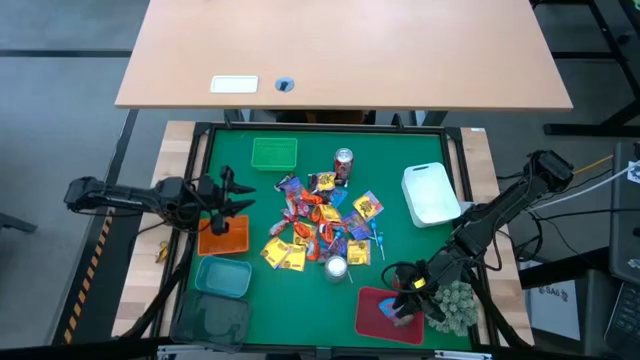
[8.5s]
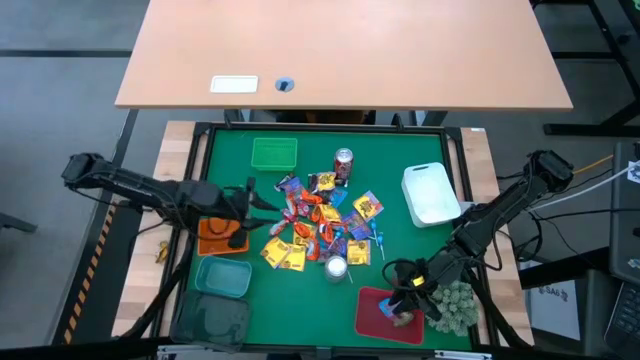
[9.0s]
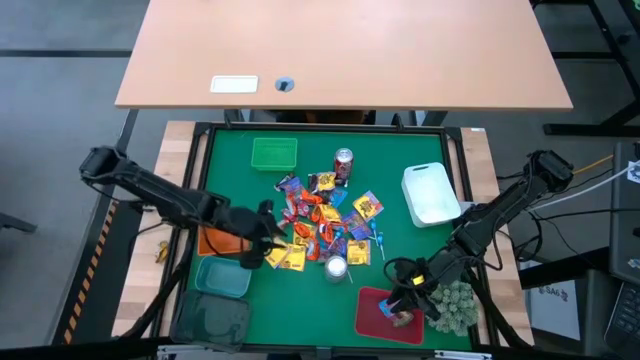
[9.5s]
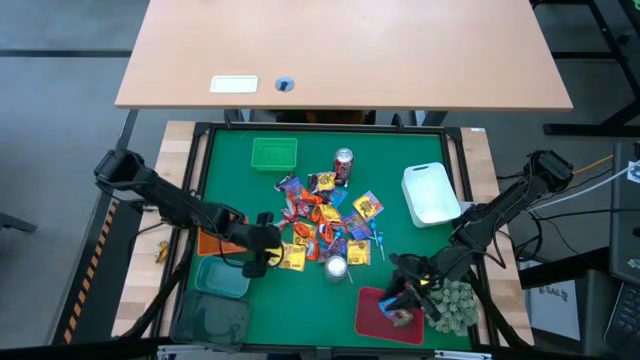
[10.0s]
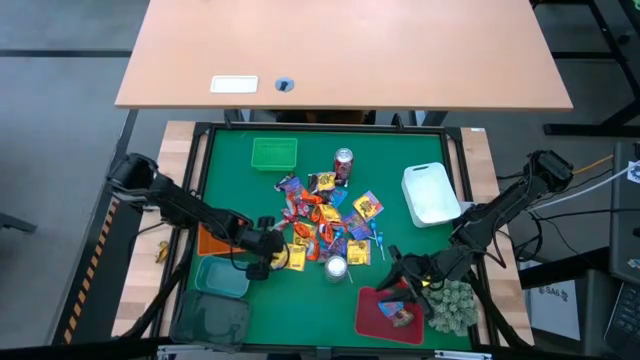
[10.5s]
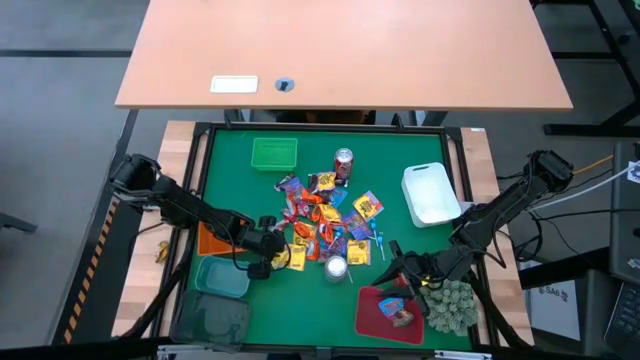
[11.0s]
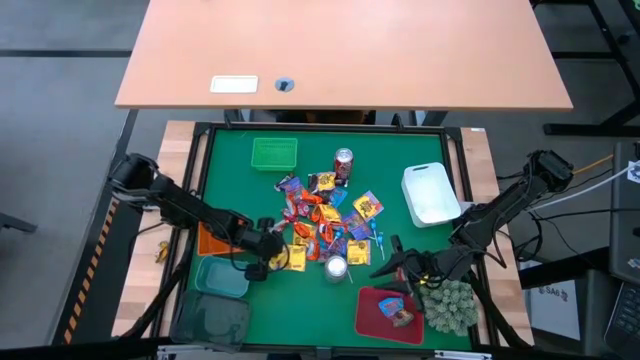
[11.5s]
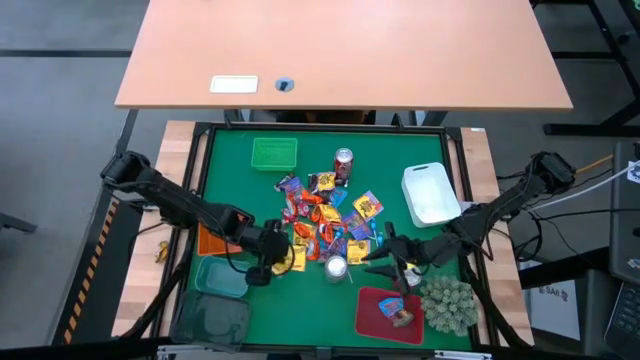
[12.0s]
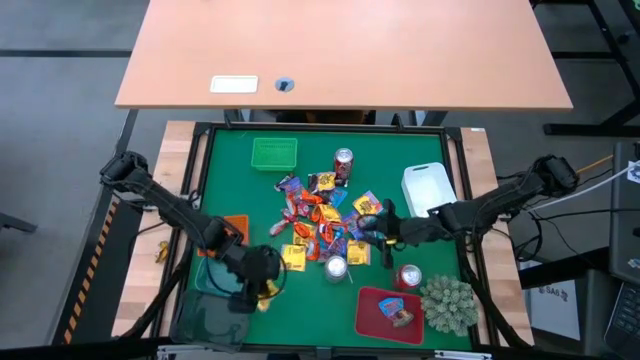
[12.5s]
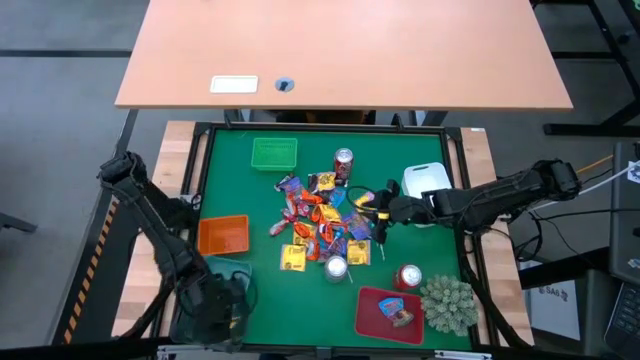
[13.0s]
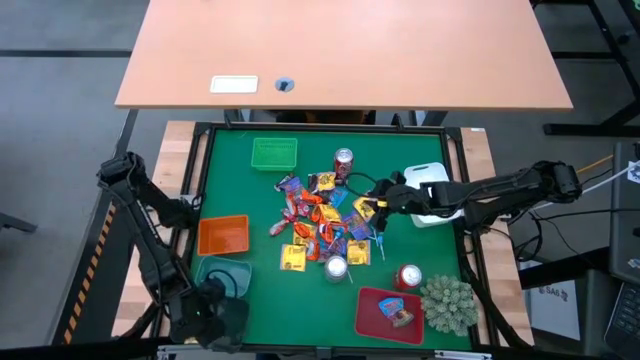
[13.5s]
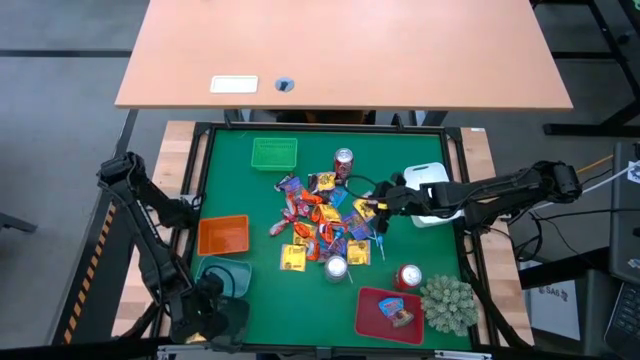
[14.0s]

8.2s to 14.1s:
Task: Sort candy
Put the yellow candy into the black bin

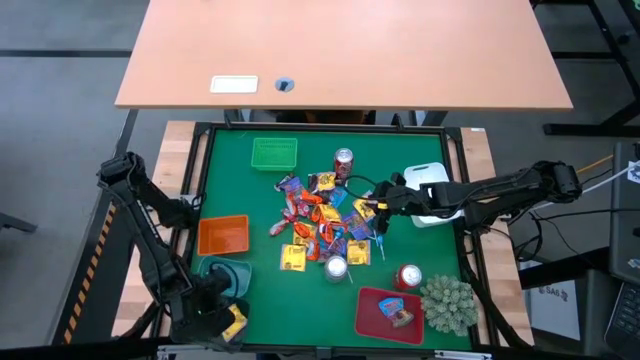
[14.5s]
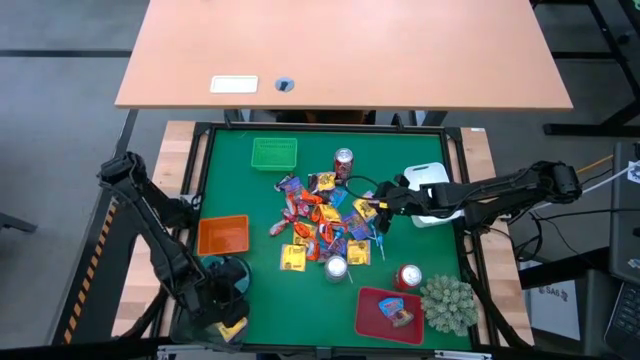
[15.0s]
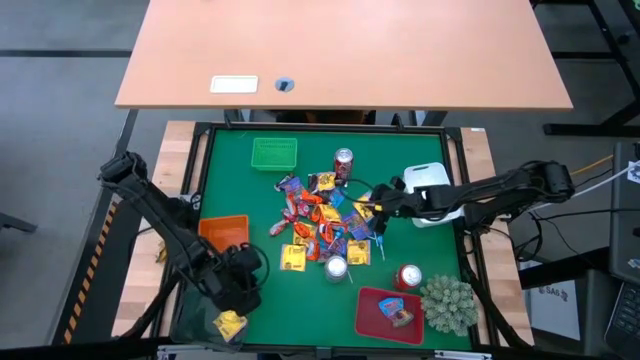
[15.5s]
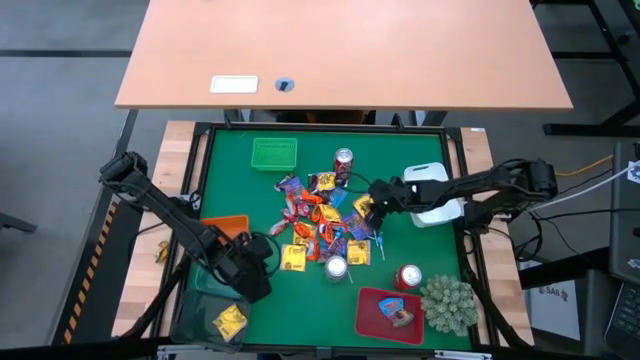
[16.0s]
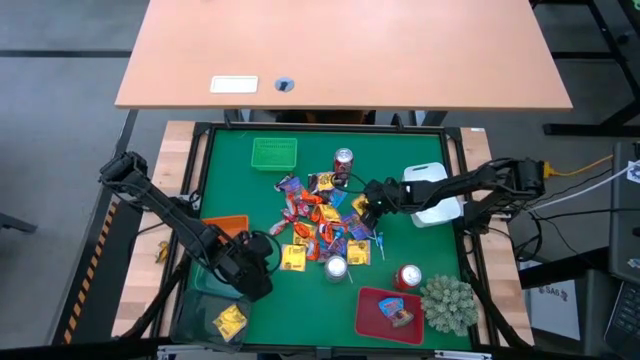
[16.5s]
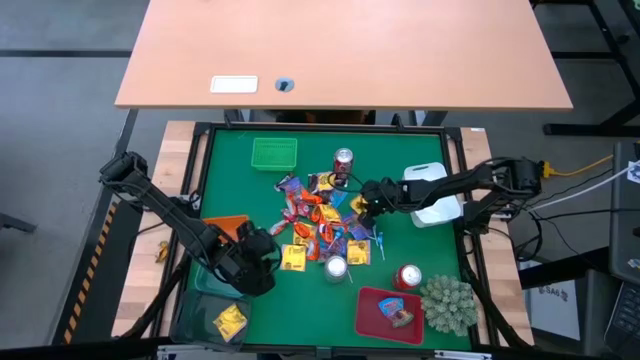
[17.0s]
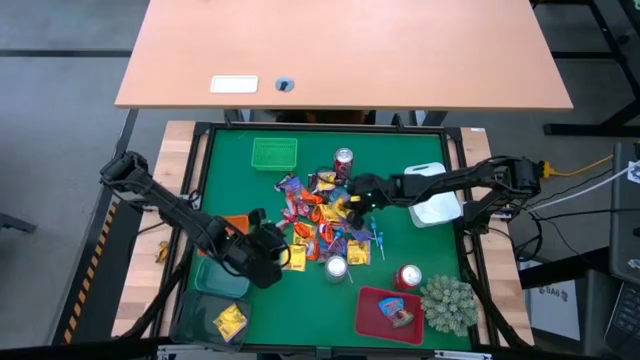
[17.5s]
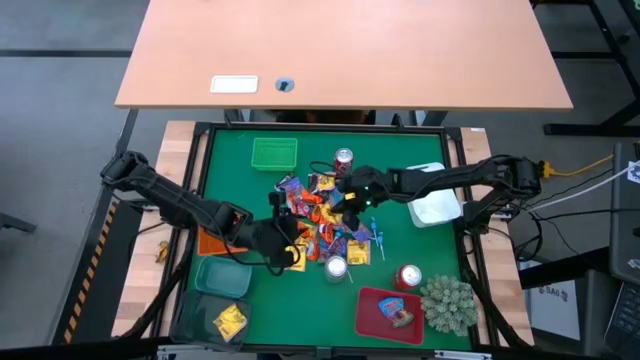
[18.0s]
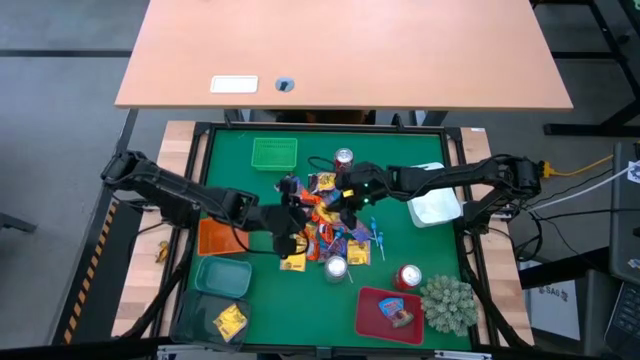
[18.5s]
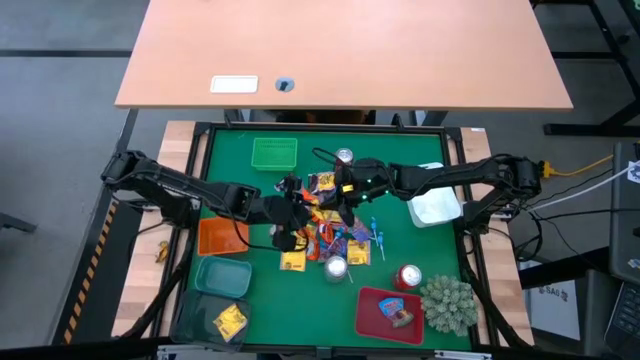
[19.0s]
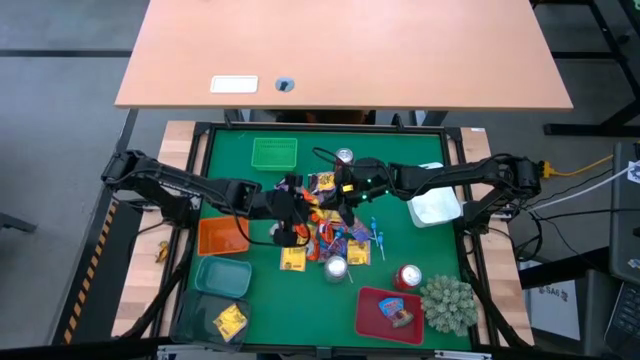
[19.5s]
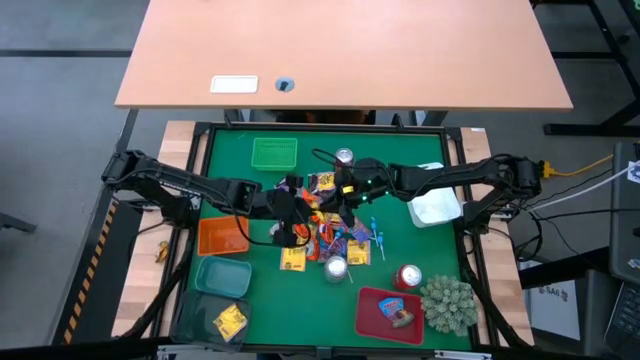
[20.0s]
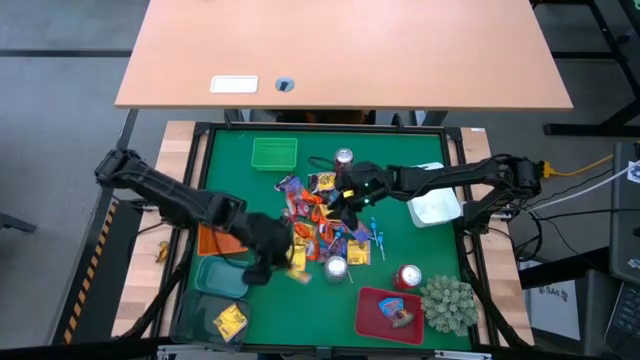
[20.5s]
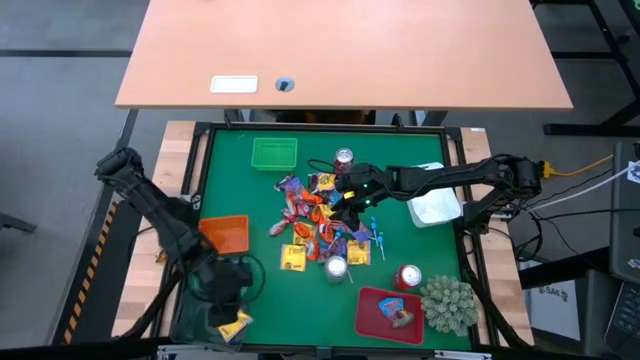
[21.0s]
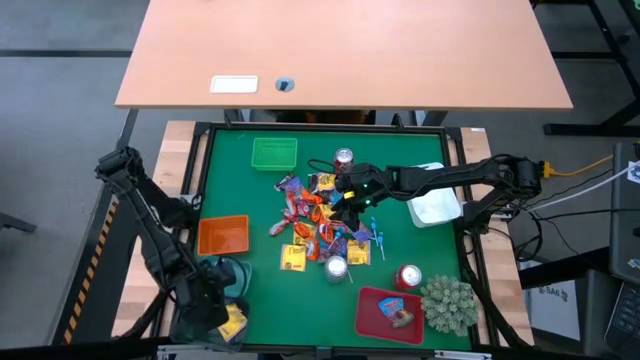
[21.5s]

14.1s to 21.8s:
Put the yellow candy into the black bin

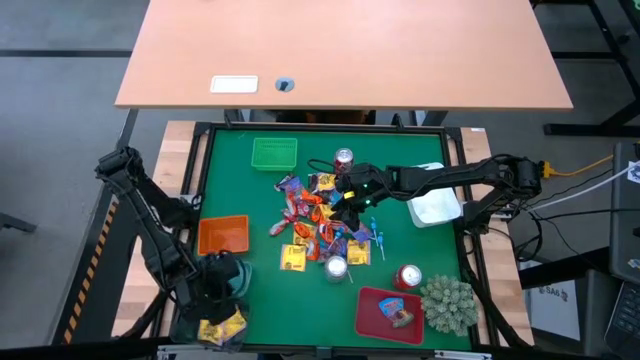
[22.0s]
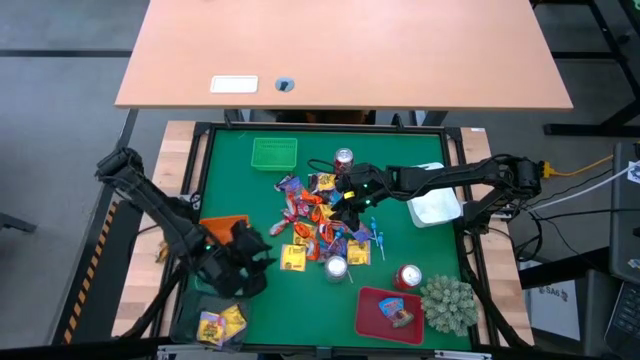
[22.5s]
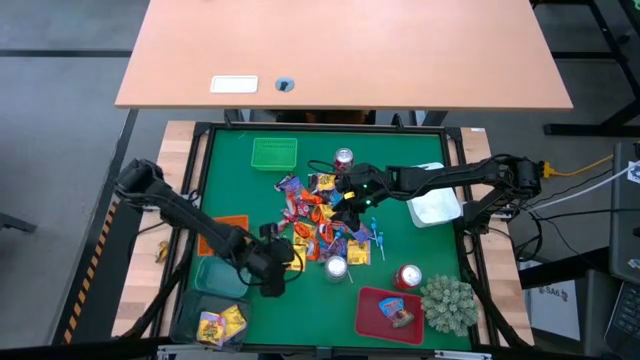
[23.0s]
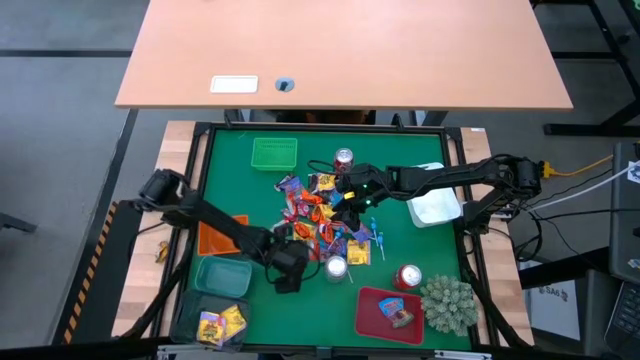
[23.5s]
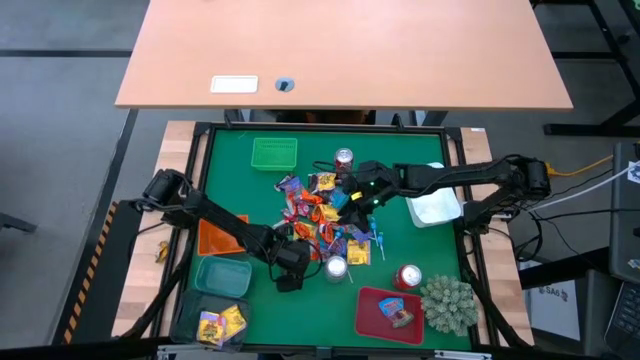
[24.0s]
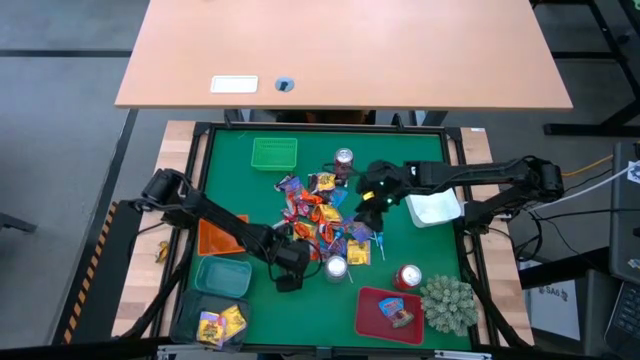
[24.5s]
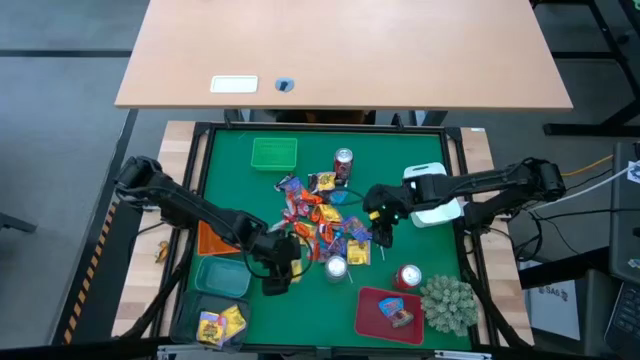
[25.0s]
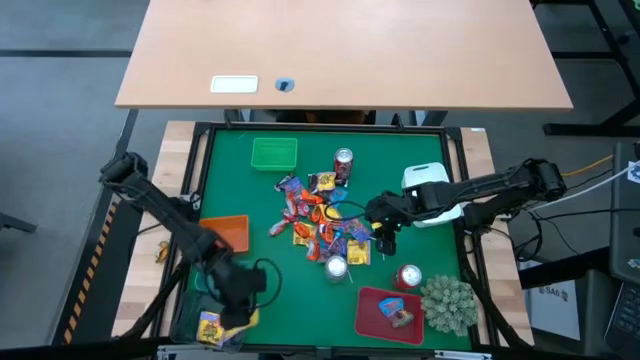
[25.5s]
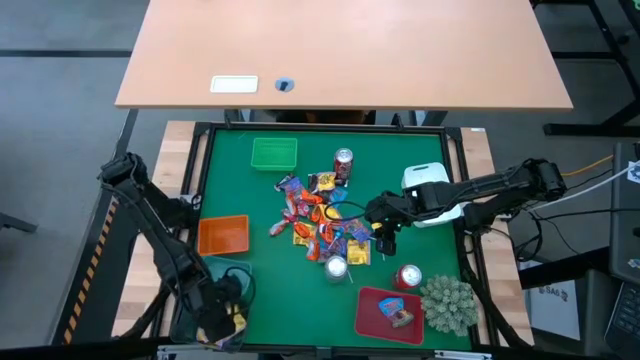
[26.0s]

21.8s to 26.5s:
Put the yellow candy into the black bin

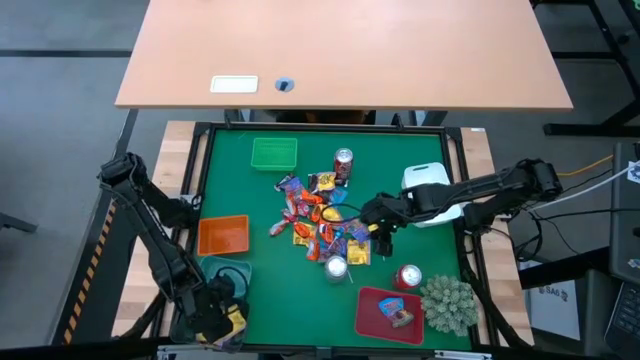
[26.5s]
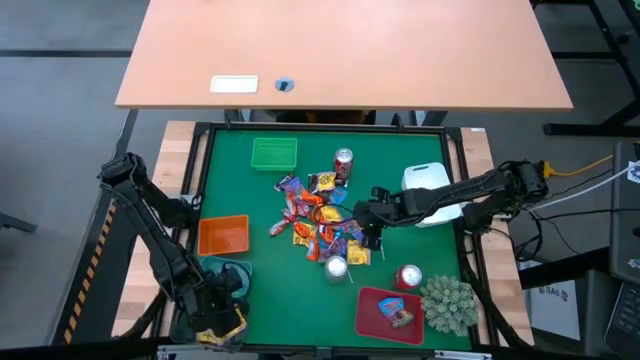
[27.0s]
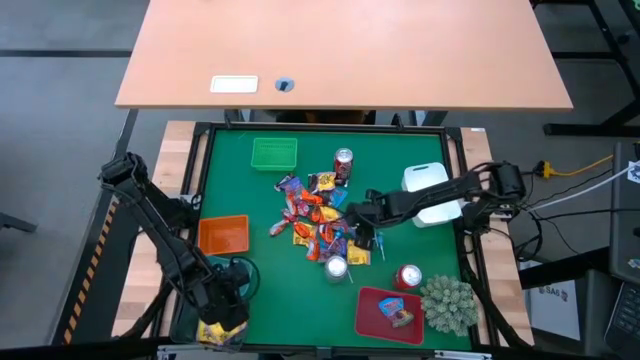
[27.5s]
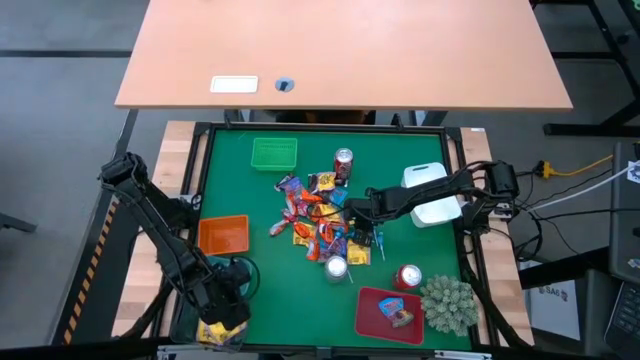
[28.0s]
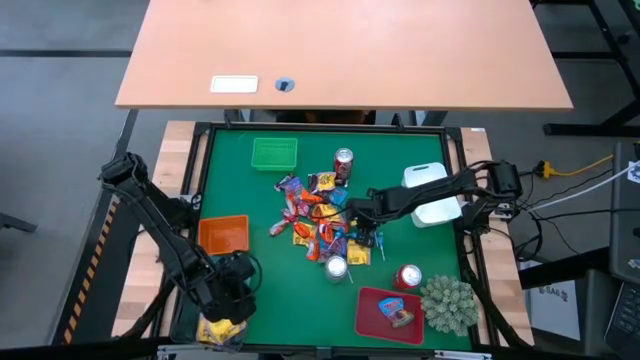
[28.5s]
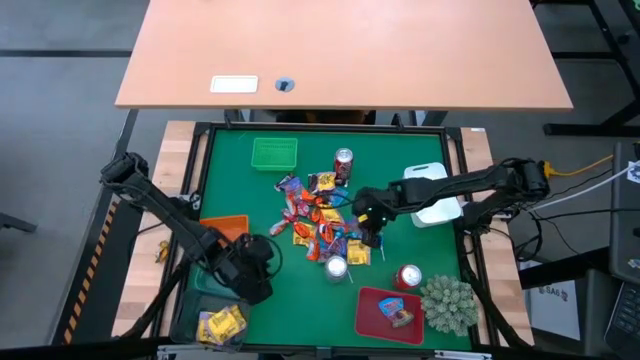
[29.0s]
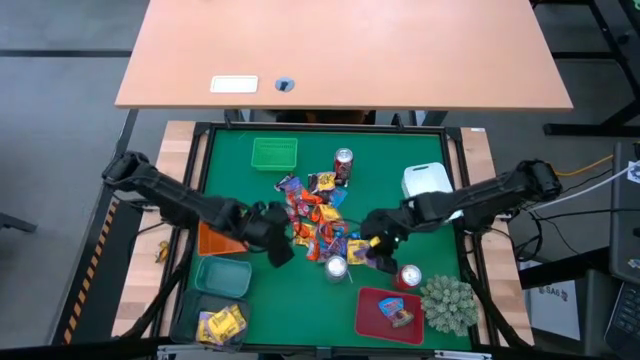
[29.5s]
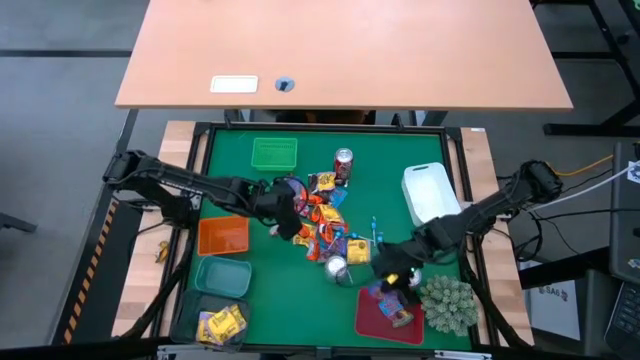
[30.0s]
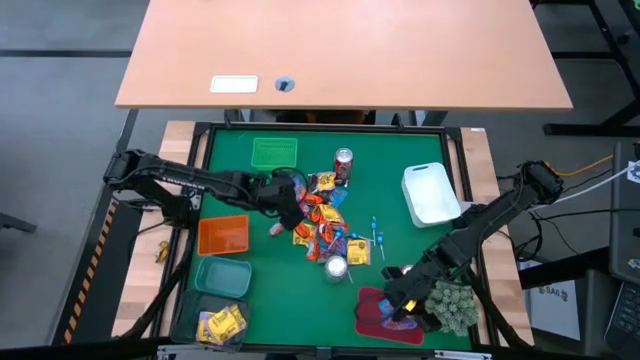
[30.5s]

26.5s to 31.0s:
Put the purple candy into the red bin
